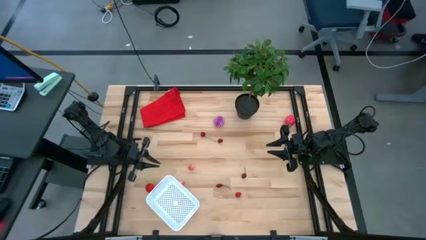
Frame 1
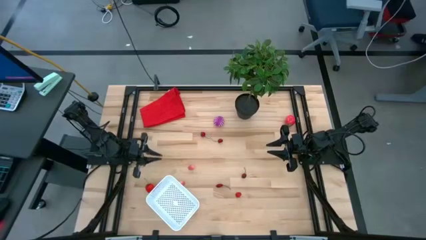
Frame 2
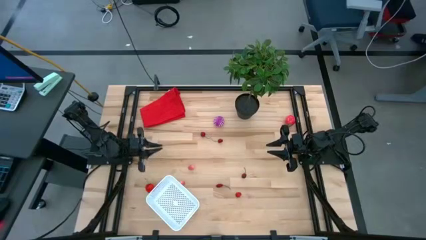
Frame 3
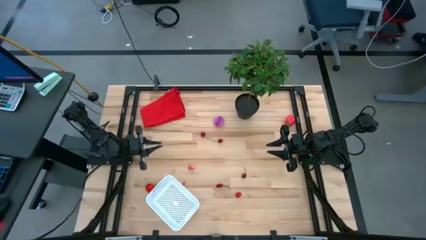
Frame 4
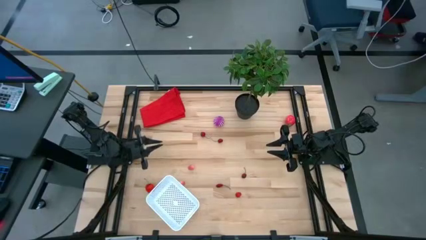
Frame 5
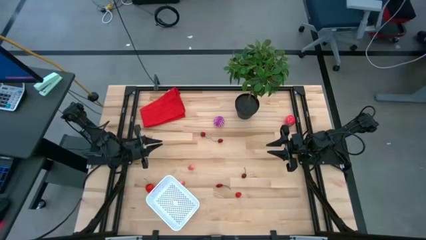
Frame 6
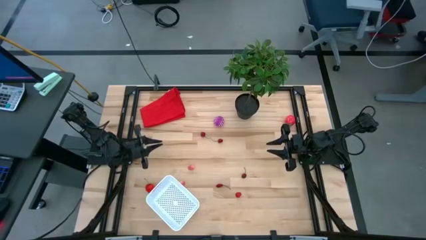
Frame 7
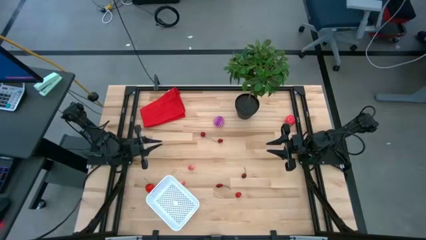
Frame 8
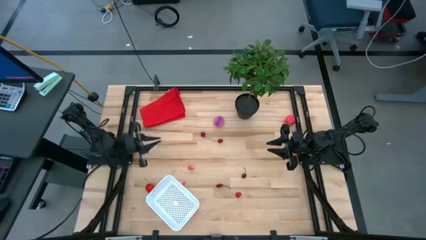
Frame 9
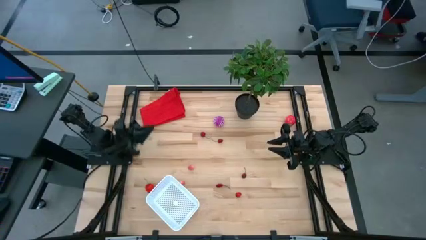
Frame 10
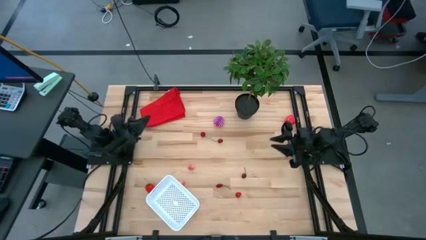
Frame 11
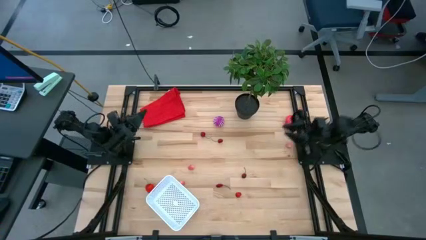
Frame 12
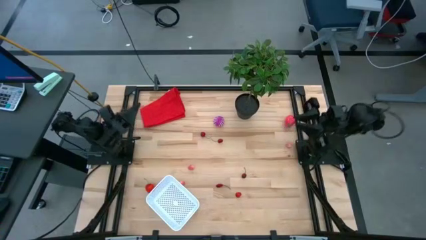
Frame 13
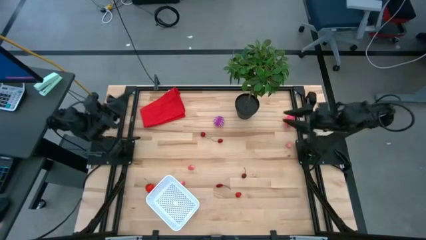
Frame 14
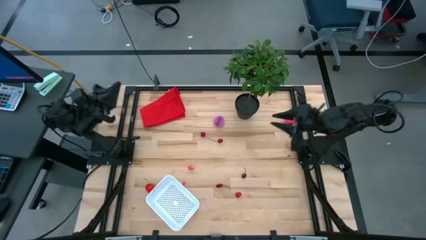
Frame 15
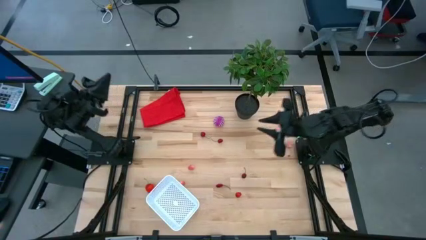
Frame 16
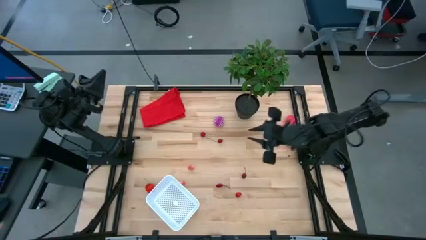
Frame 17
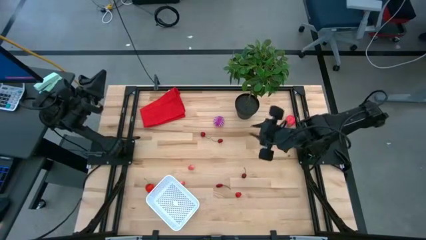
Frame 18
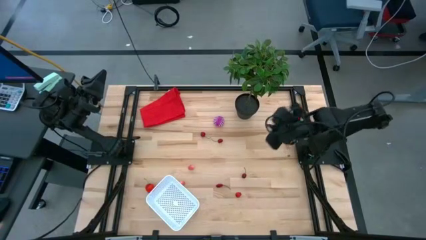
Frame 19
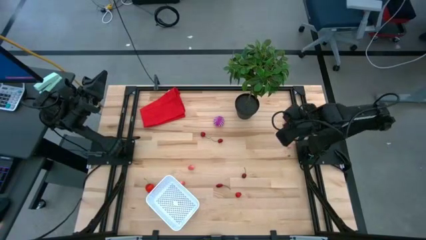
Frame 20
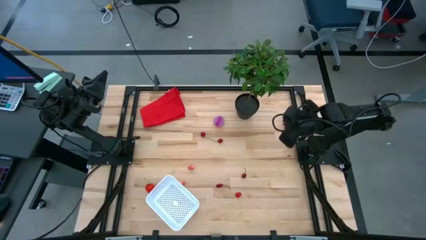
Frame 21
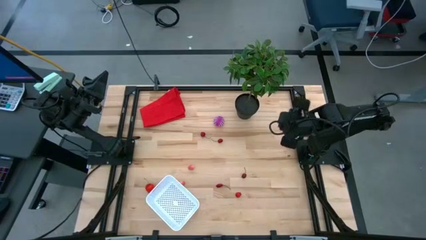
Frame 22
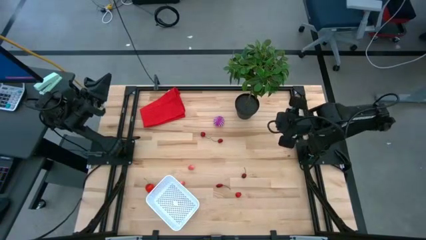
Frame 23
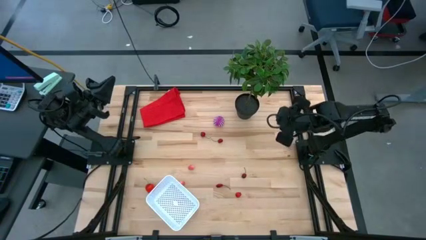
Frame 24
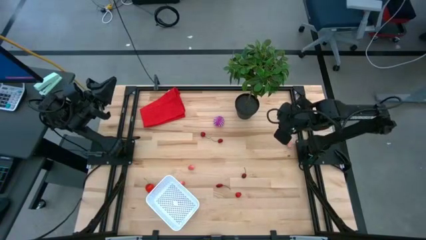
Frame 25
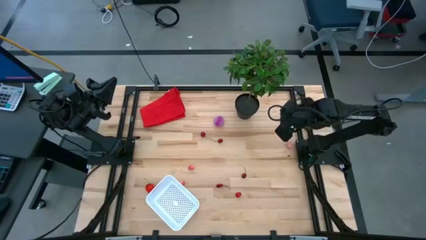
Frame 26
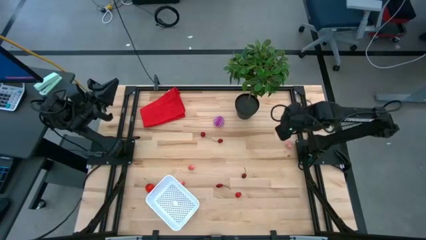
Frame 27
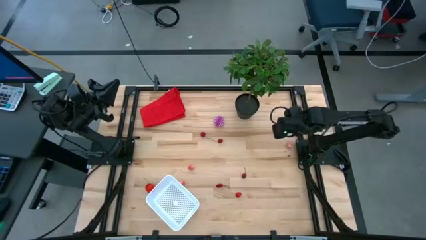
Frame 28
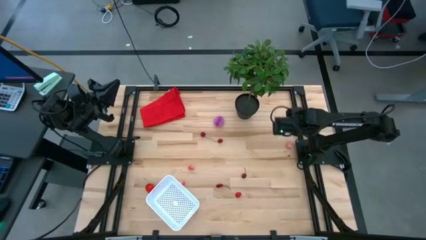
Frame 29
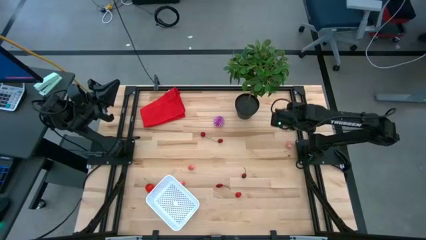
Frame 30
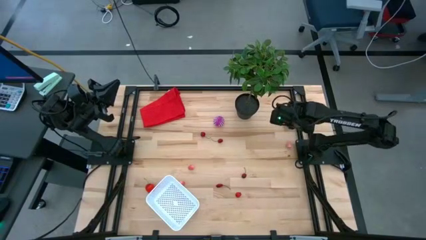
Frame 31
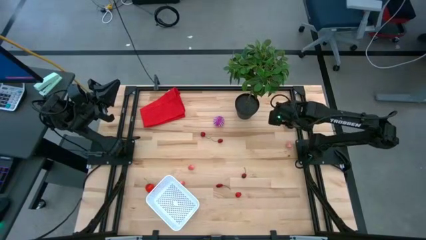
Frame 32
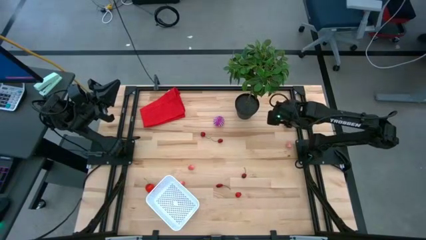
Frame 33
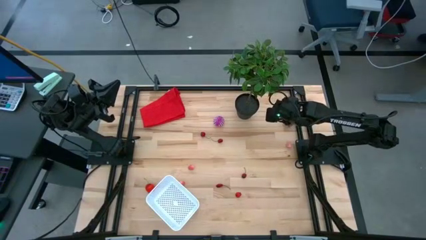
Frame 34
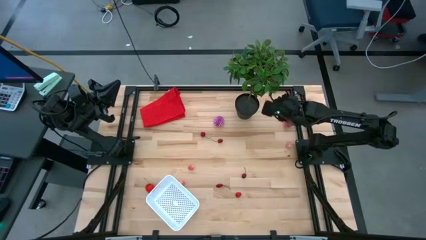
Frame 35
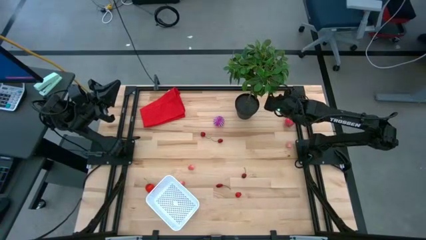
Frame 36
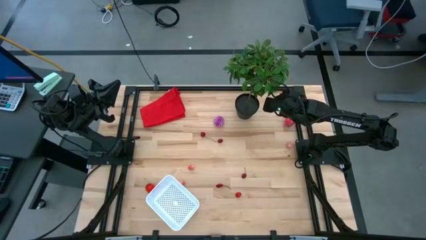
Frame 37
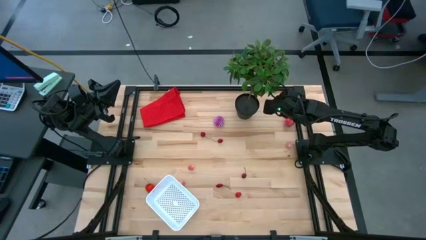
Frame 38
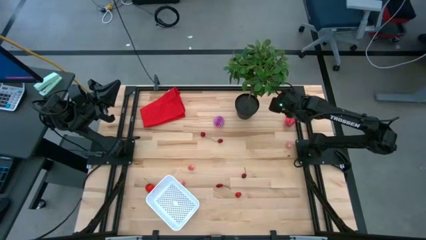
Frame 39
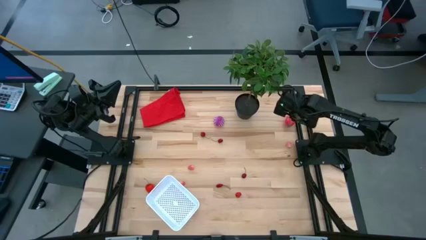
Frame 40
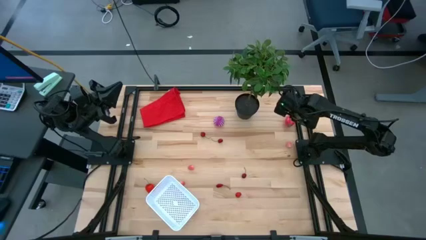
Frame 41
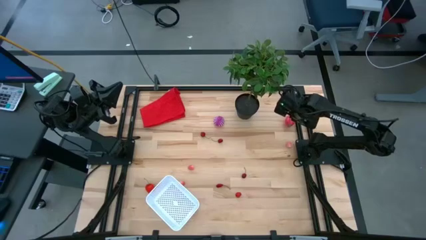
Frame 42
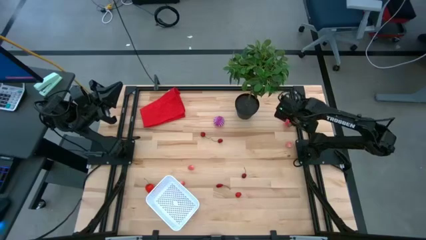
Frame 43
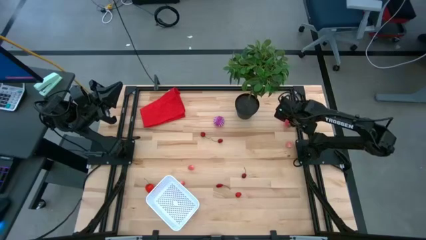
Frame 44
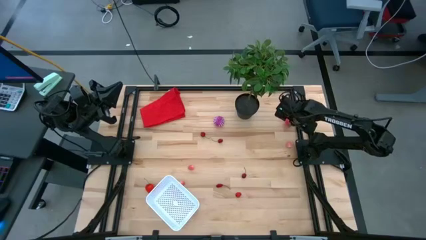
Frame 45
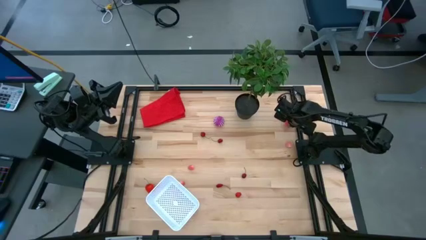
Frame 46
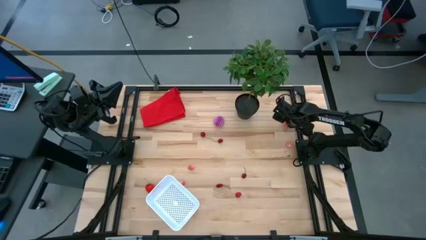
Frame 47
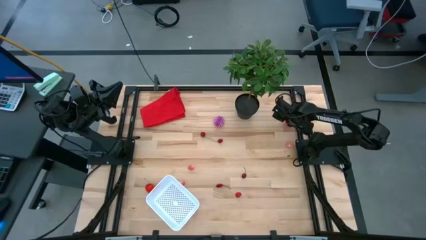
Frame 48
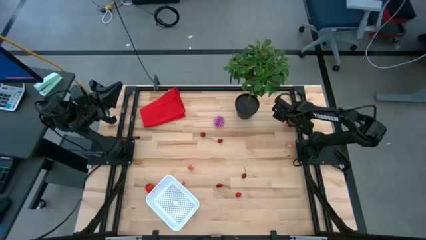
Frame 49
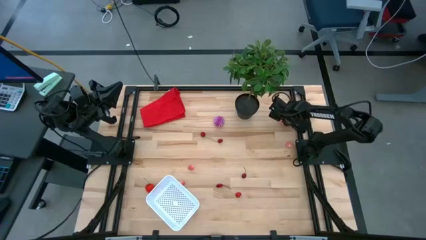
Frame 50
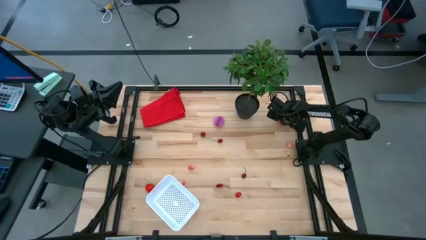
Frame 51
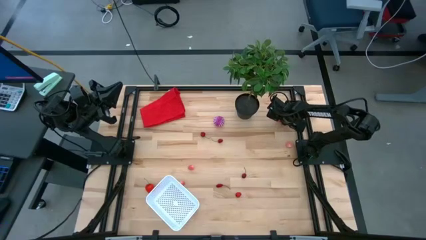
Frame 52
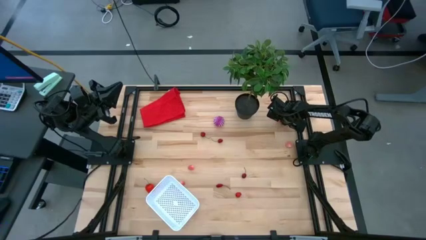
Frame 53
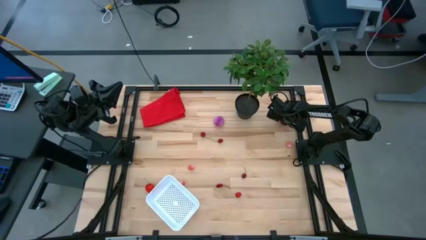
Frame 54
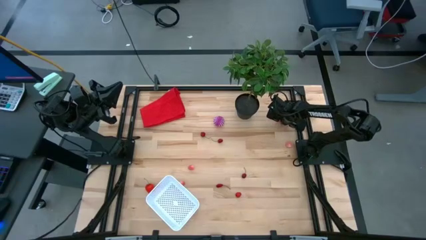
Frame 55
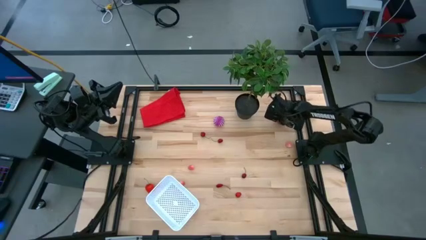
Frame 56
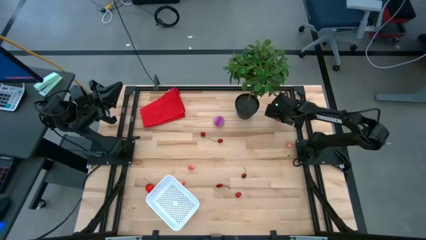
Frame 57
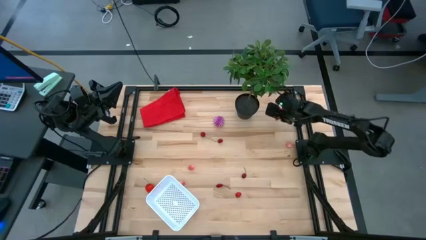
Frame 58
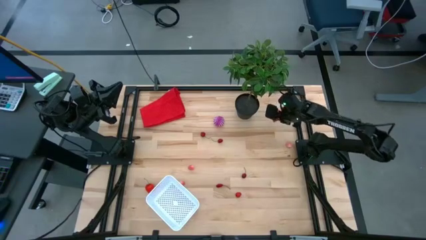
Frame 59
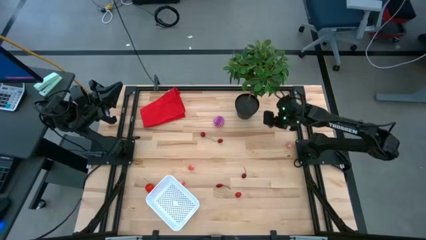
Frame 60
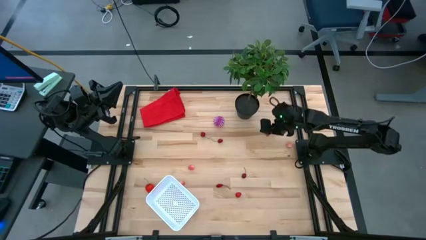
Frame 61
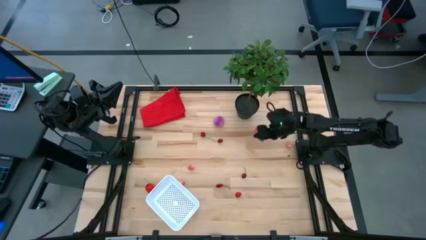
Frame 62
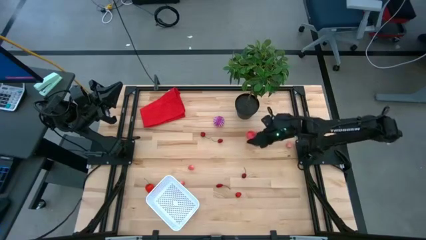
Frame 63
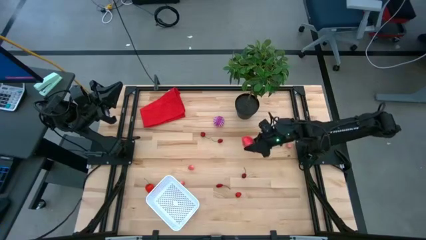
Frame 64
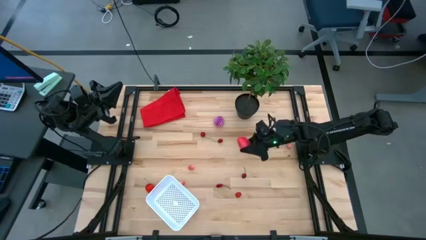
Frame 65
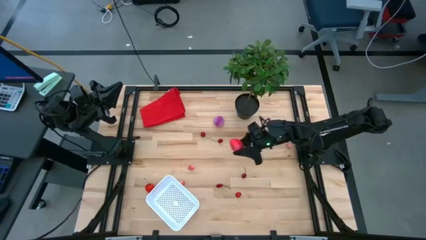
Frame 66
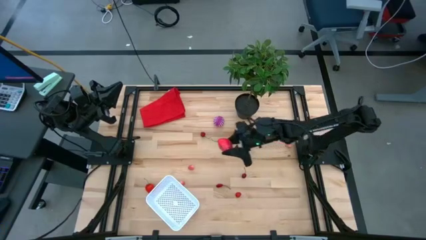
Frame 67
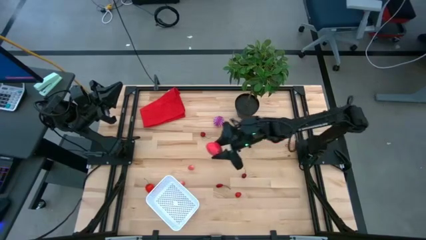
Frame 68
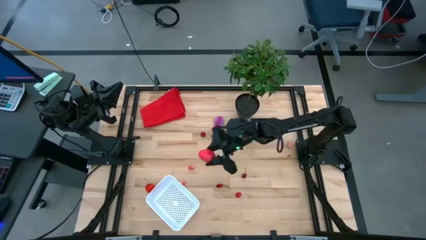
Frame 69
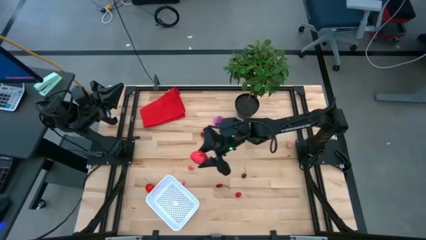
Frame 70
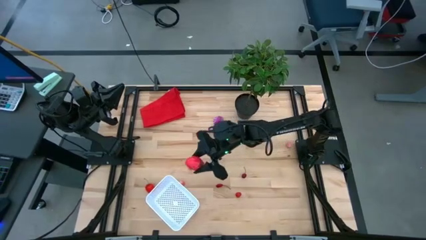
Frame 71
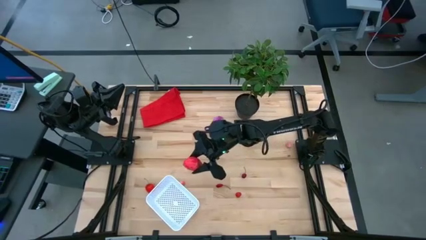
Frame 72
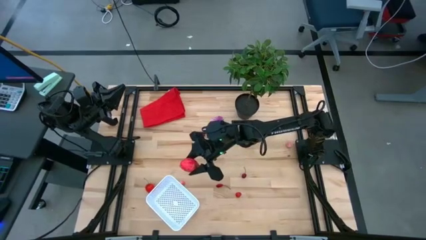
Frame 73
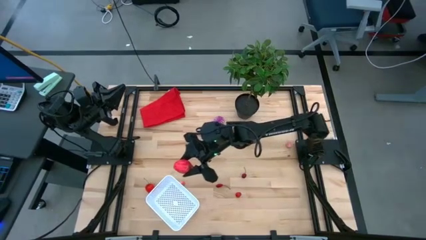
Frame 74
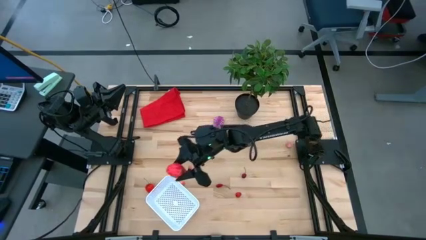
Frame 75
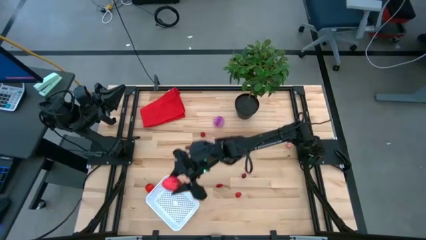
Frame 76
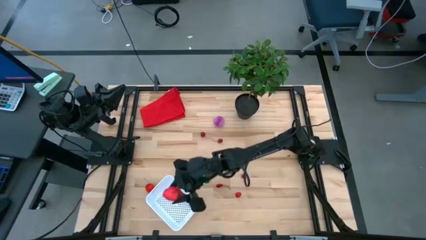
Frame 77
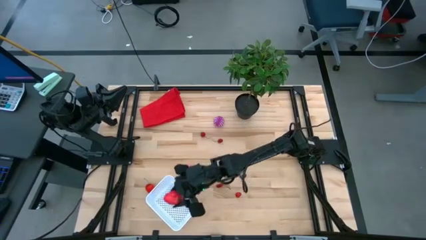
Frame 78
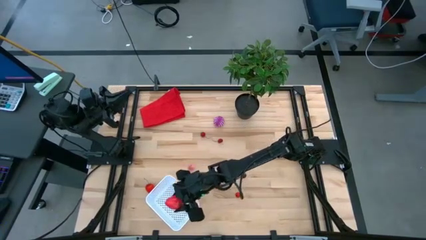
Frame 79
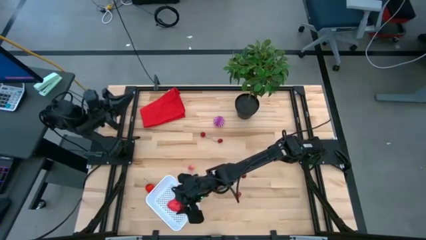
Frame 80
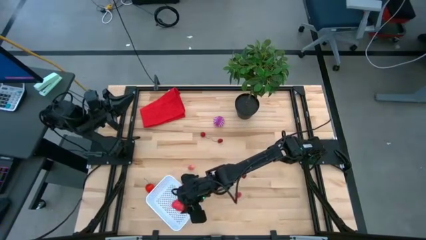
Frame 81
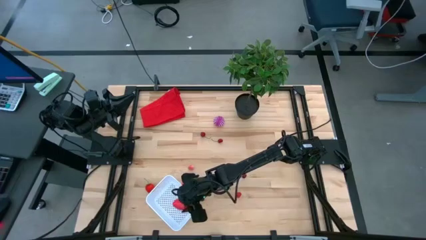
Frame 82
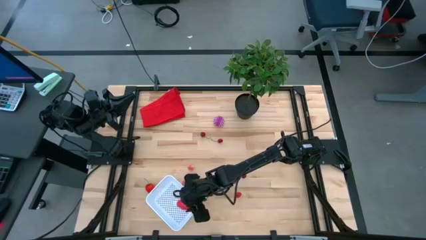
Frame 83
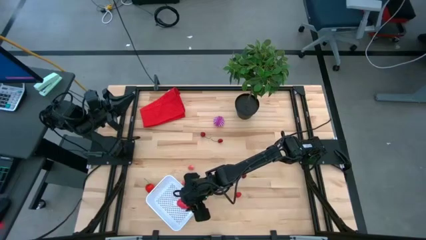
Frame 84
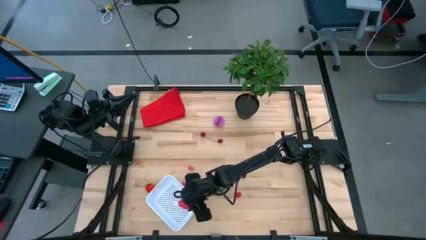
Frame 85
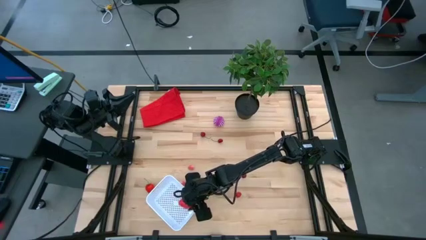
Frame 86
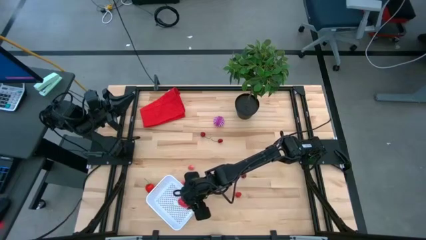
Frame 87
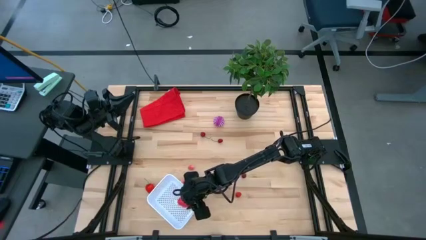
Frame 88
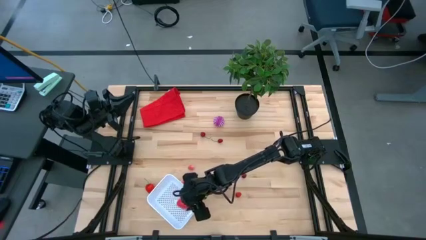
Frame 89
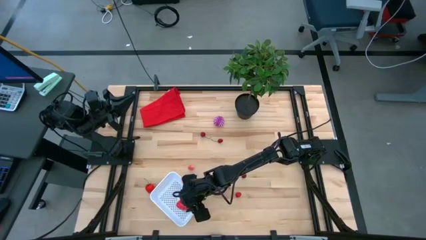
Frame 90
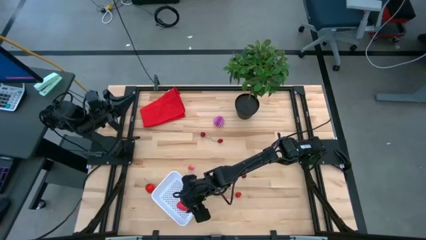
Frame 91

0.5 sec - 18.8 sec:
Task: Pick and placing Produce into tupperware
Put the dragon fruit in the basket
